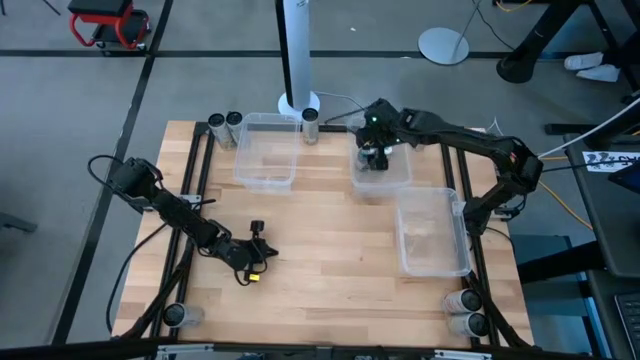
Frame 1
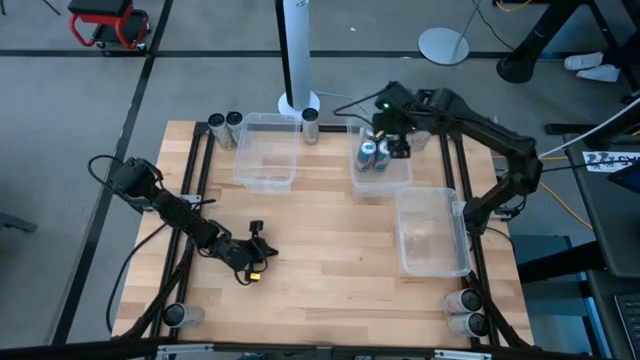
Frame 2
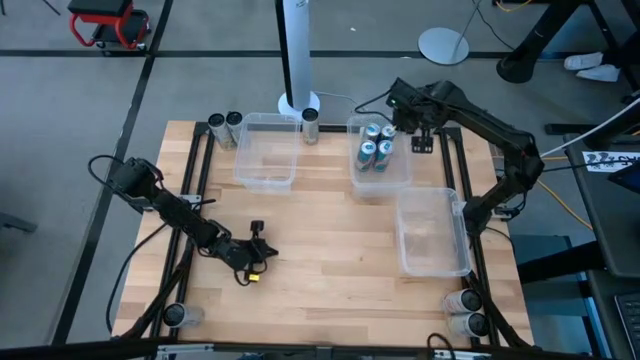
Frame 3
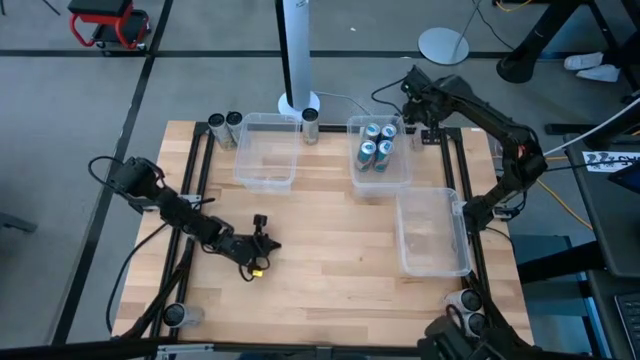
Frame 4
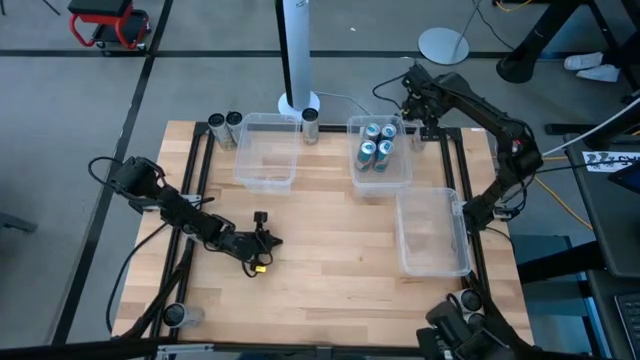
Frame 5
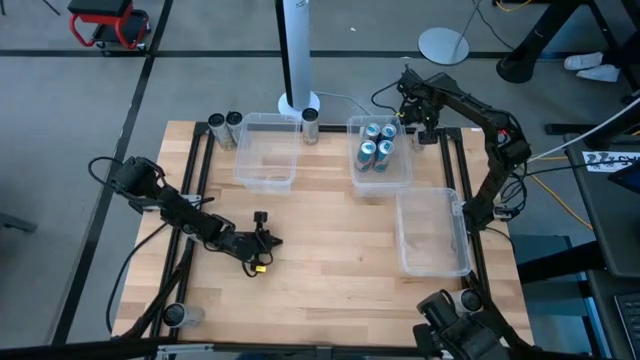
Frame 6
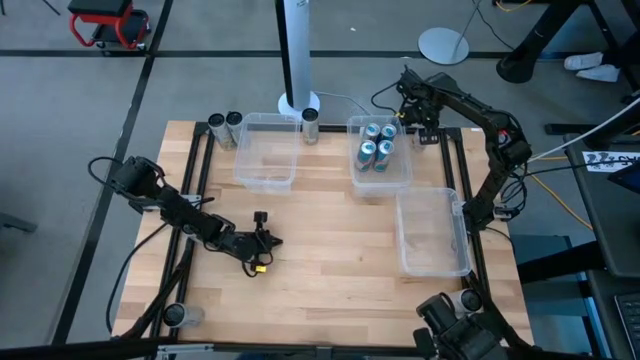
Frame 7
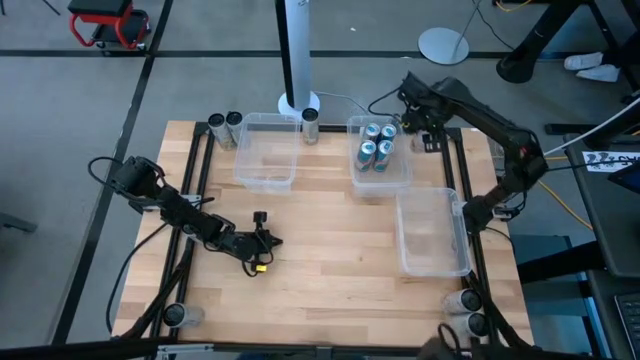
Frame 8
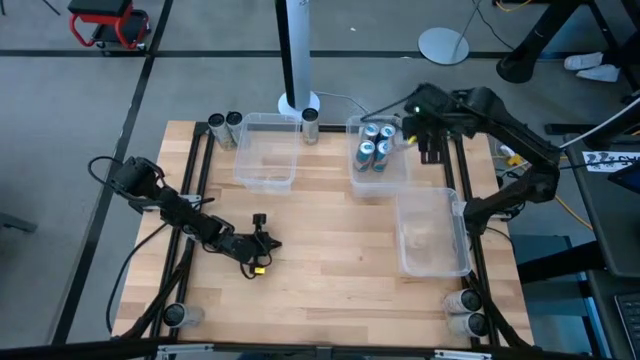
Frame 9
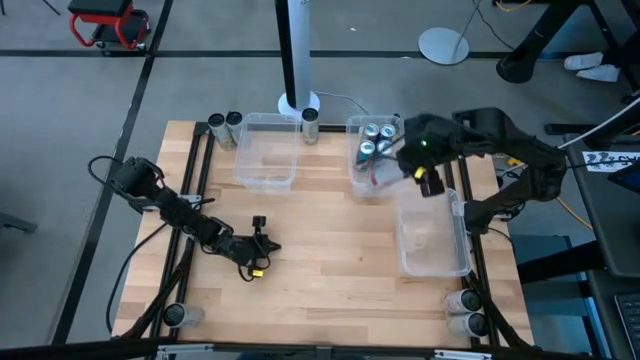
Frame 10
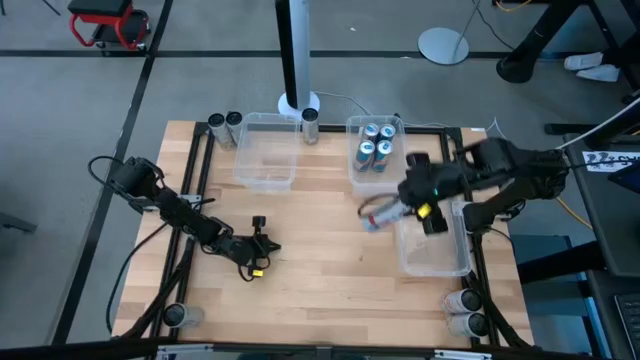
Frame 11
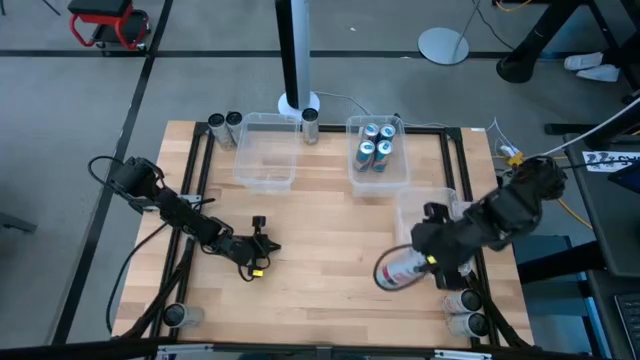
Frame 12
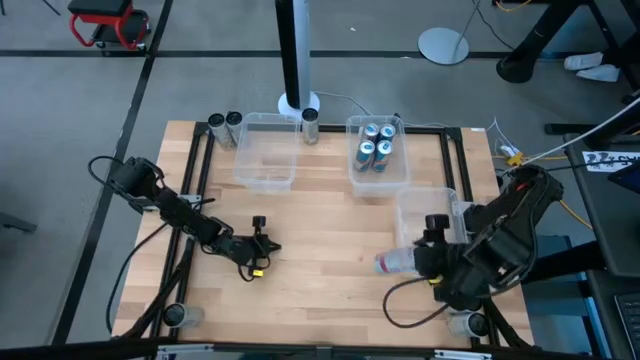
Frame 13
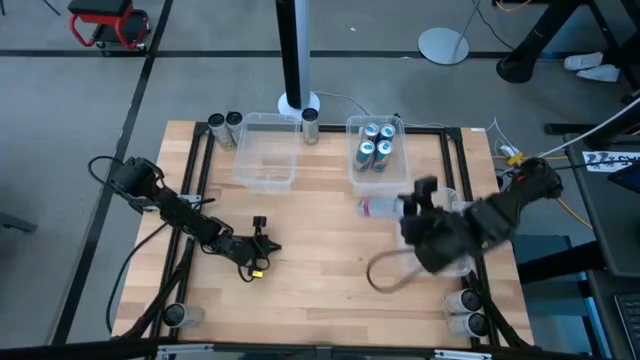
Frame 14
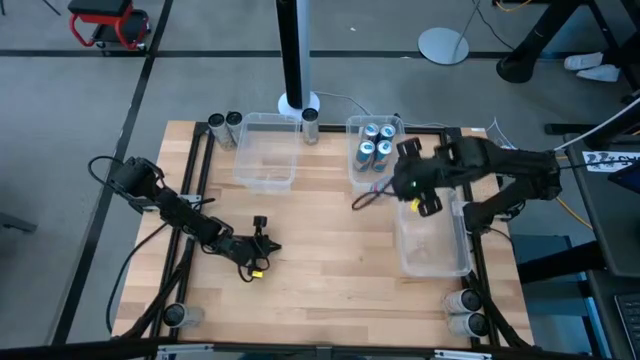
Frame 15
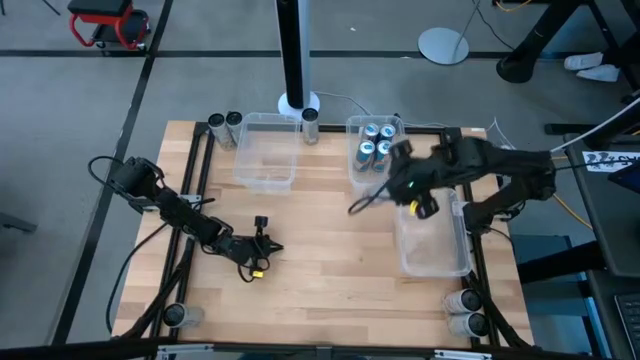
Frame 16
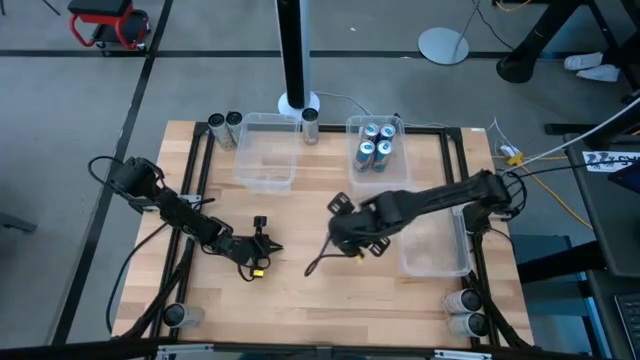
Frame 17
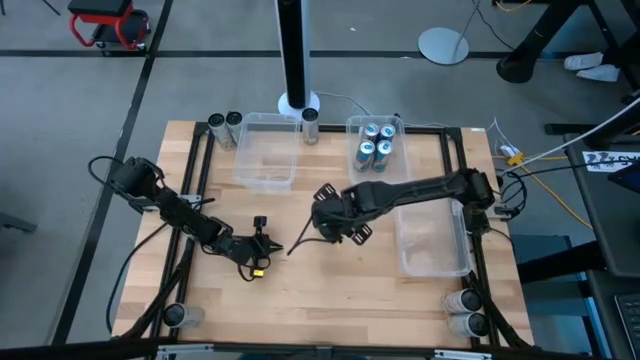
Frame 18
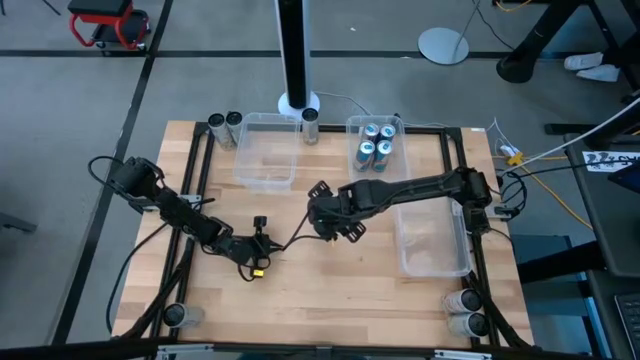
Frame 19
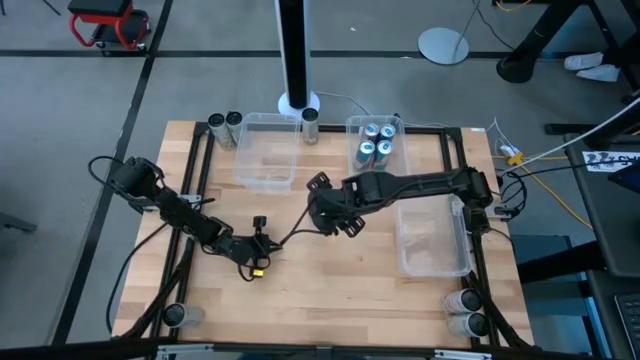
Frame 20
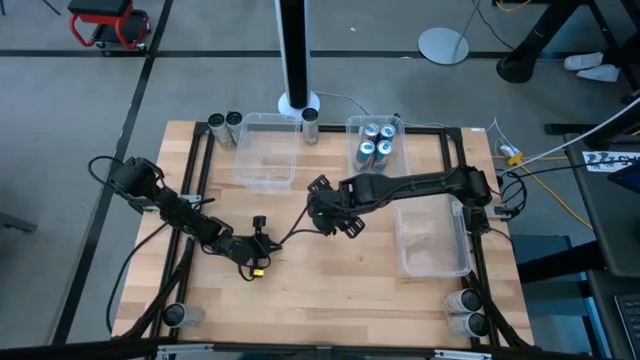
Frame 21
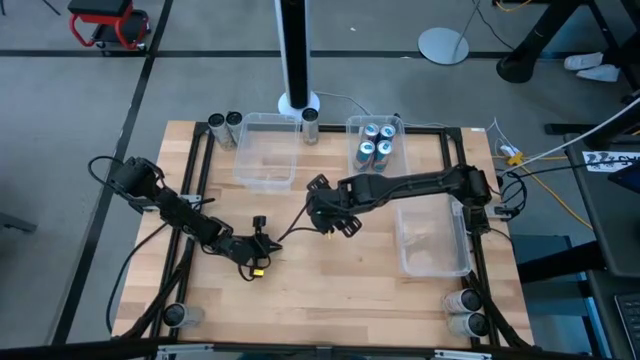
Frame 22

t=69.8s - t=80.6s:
Task: Sort soda cans
Move the white pink soda can to the middle of the table

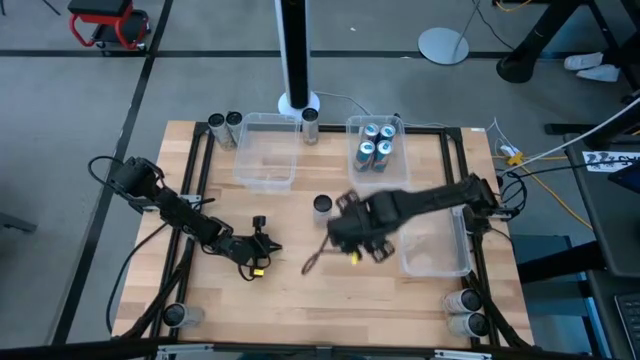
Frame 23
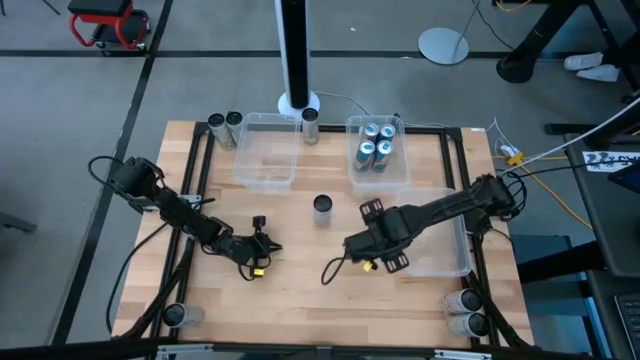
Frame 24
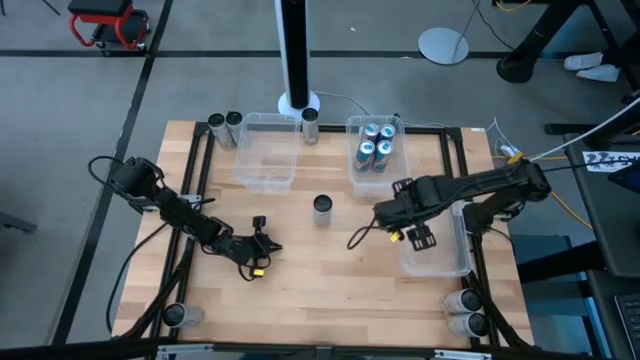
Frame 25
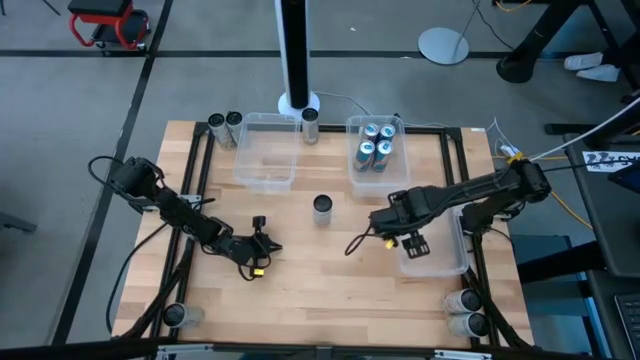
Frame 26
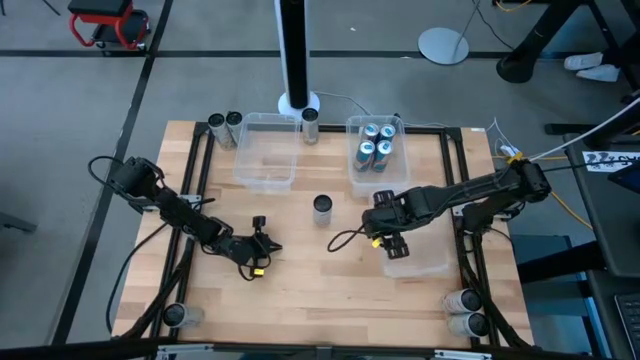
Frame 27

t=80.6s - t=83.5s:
Adjust the bottom right transparent bin

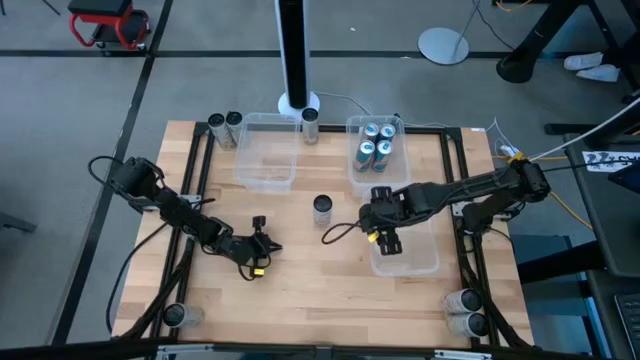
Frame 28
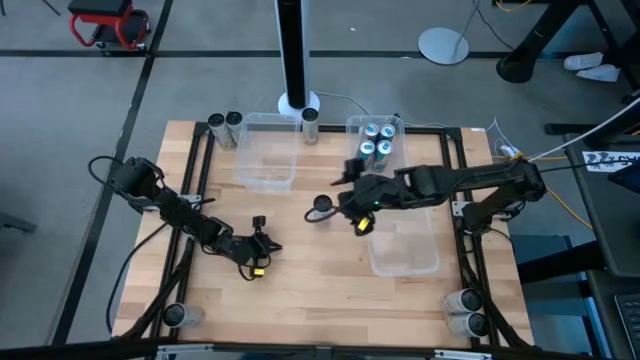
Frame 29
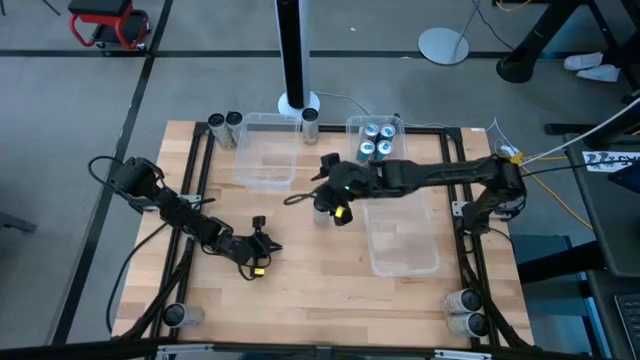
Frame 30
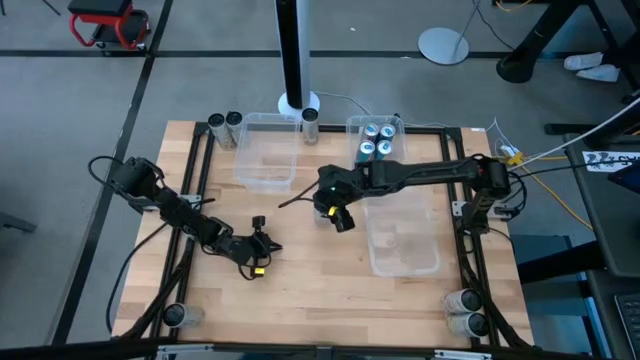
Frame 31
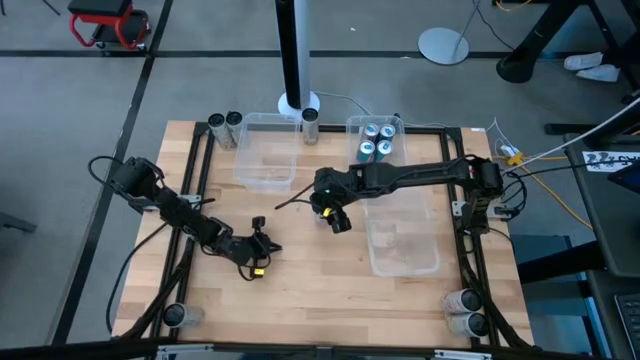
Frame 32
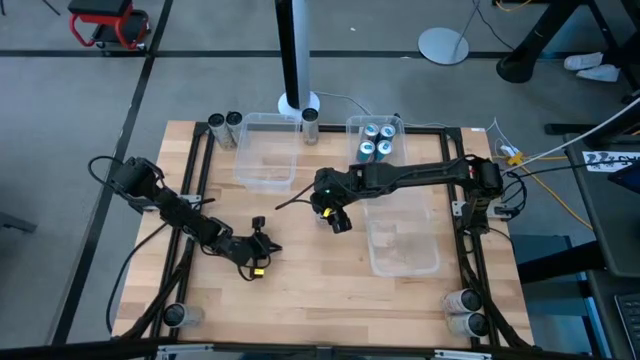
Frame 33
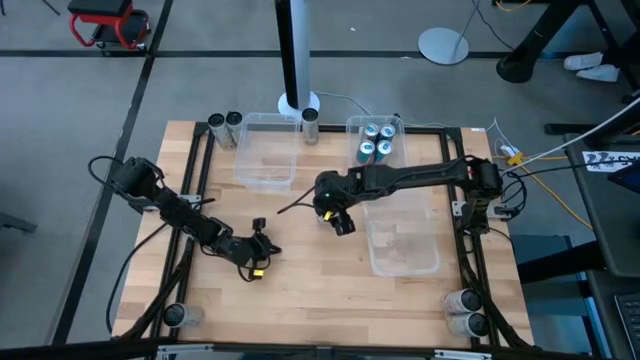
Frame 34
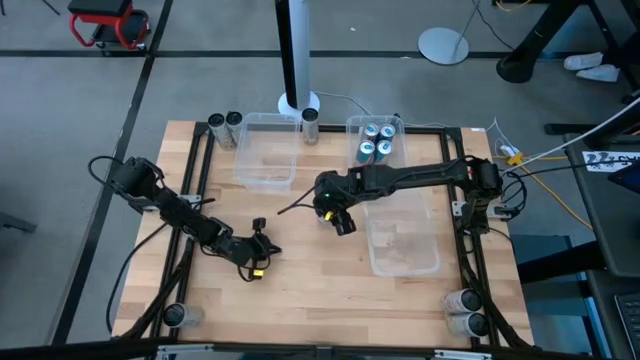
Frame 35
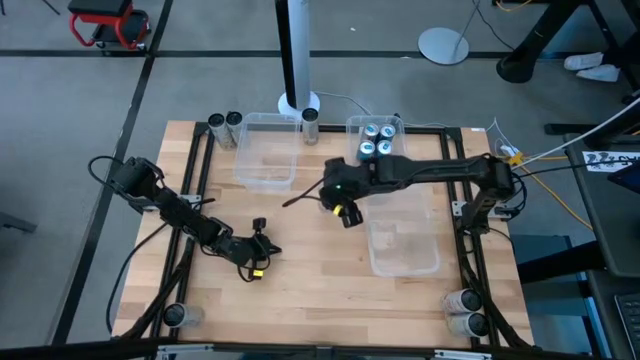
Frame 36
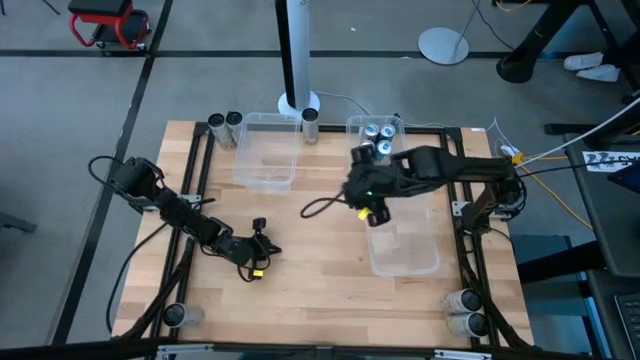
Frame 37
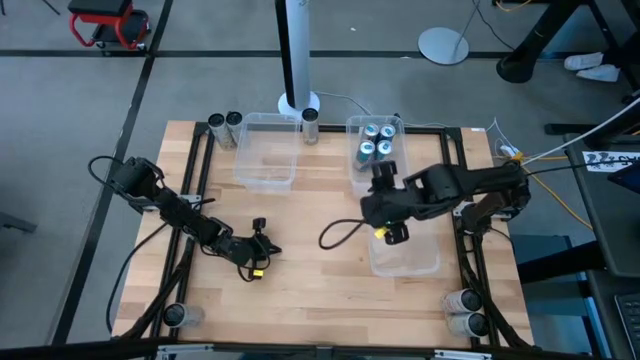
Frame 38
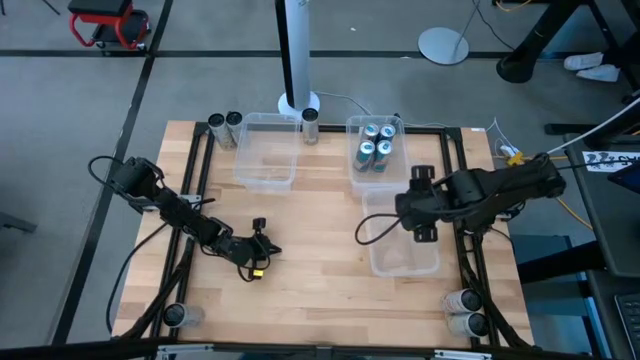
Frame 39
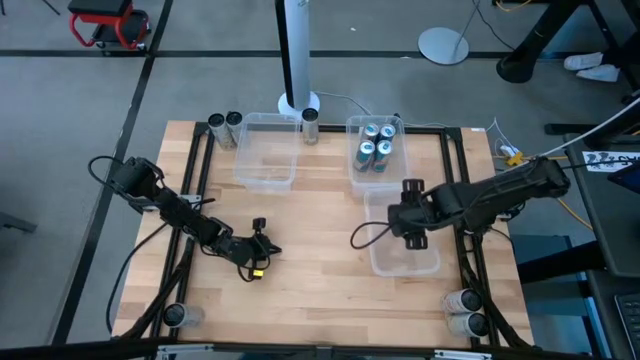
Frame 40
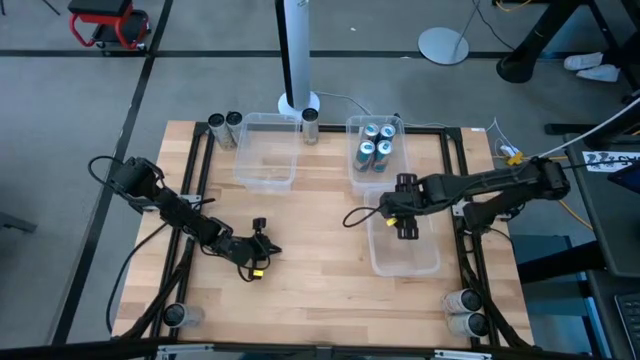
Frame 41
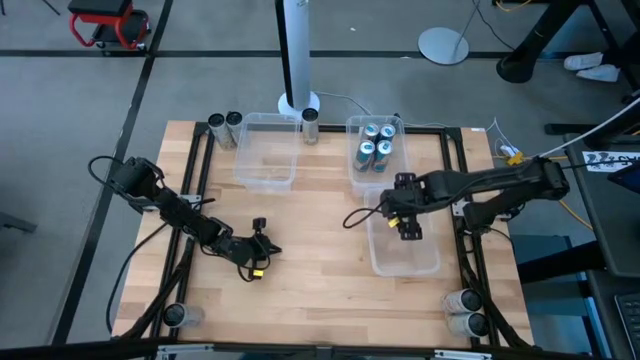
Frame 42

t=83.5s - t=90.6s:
Put the white pink soda can into the bottom right transparent bin
